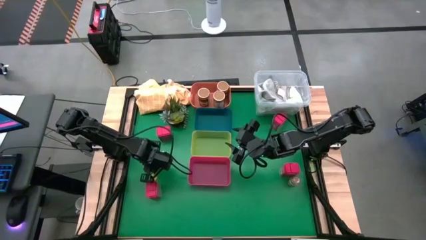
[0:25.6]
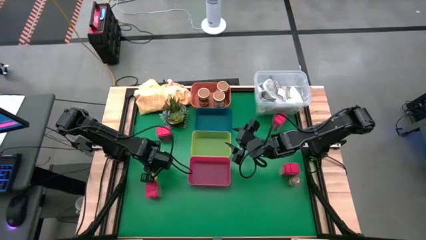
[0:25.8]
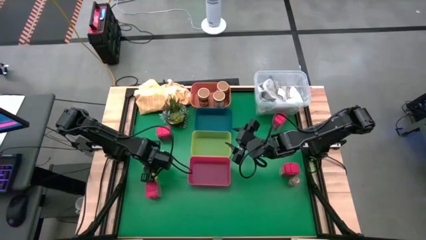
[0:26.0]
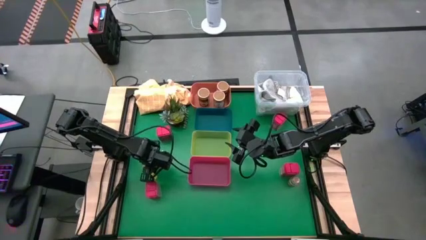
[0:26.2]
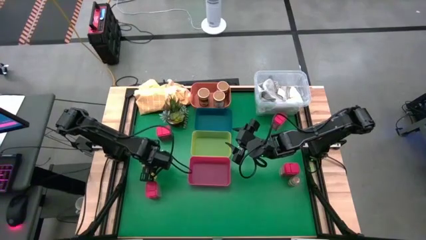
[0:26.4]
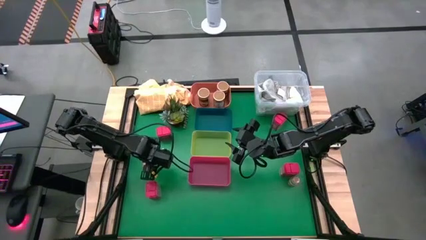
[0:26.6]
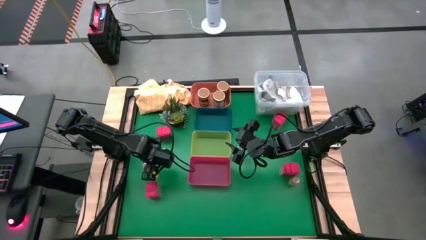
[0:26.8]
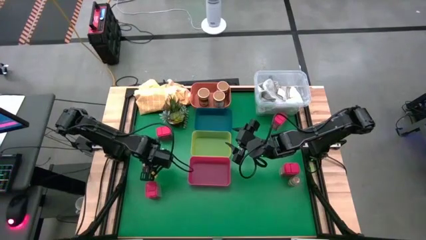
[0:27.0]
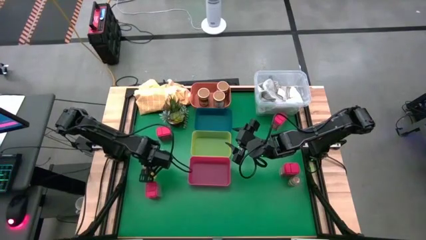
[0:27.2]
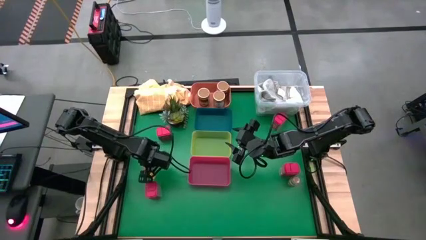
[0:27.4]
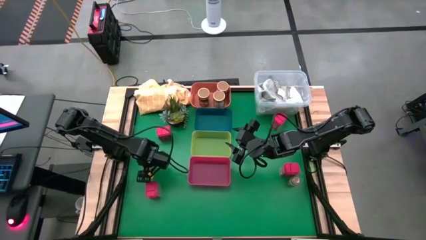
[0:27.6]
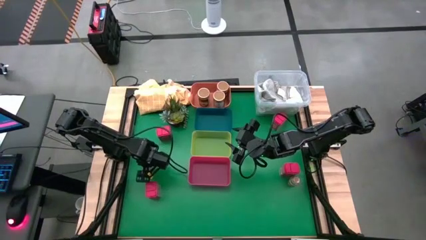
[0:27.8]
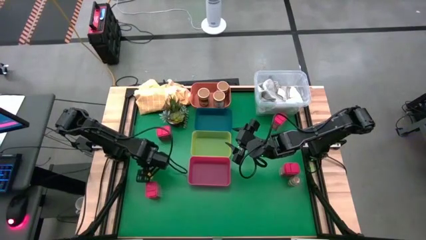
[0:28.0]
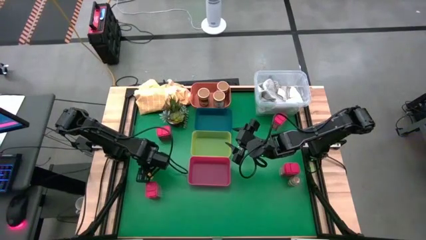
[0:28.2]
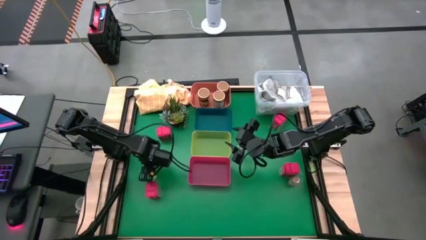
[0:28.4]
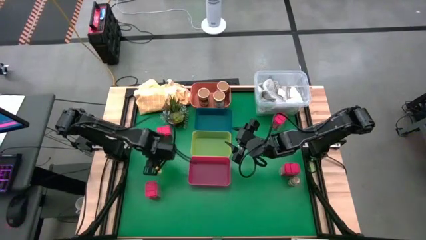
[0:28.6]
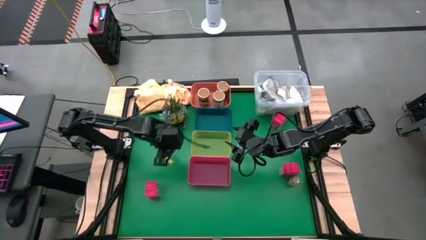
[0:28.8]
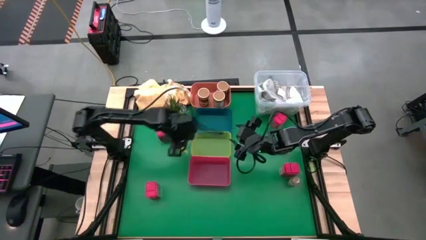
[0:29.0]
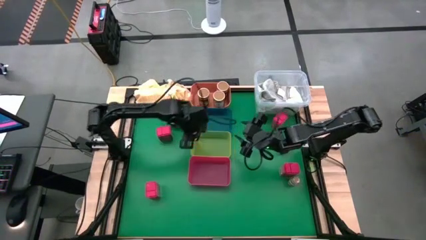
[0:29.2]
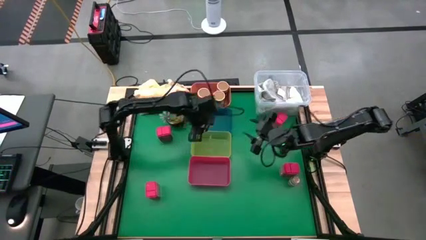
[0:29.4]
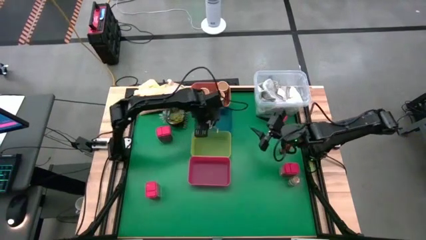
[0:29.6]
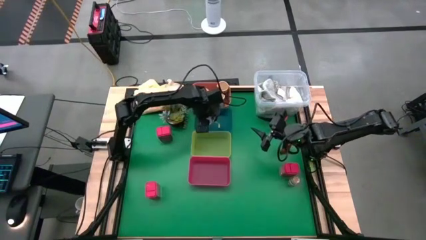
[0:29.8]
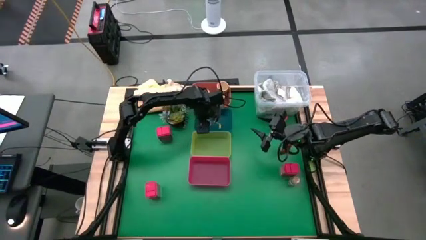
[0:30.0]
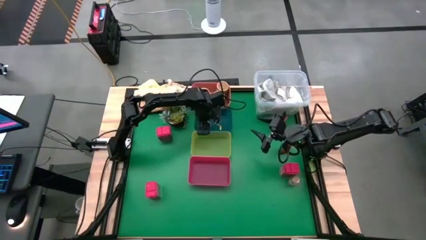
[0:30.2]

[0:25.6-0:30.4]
Task: Sort spices by type
Put the left brown spice bottle into the blue bin

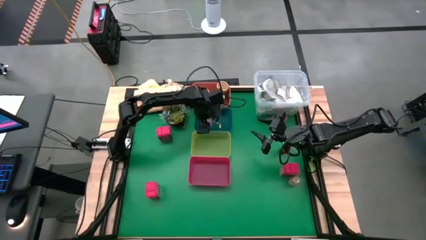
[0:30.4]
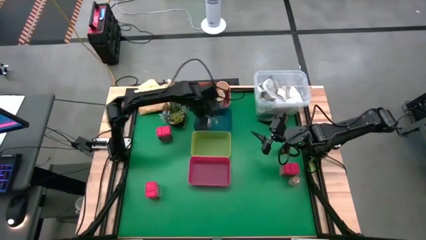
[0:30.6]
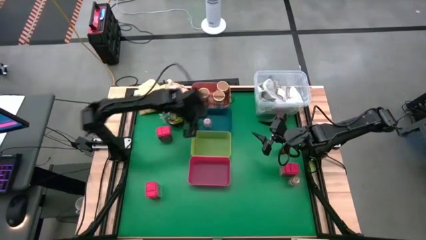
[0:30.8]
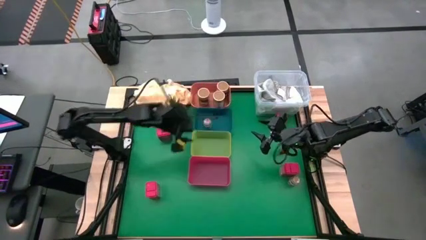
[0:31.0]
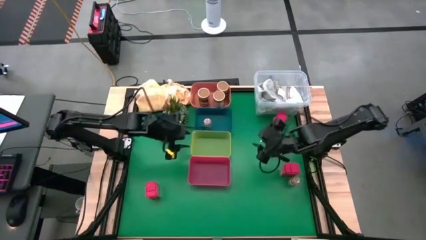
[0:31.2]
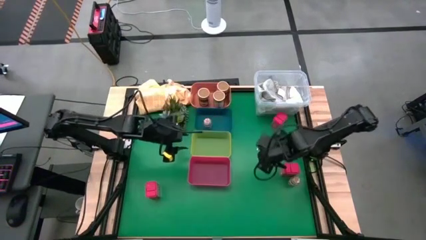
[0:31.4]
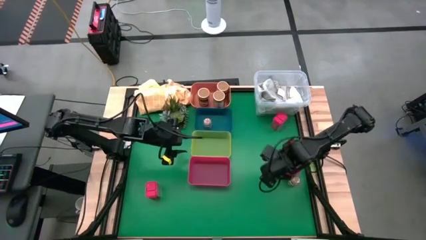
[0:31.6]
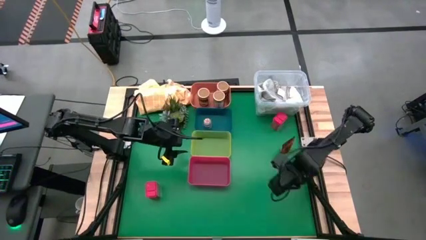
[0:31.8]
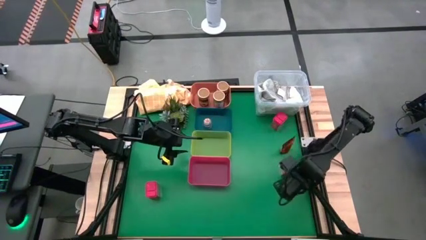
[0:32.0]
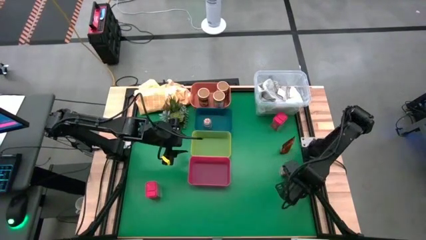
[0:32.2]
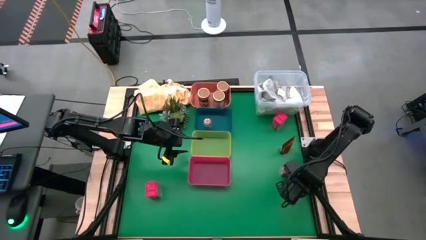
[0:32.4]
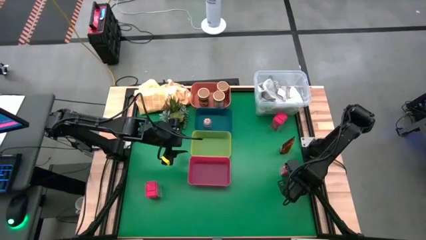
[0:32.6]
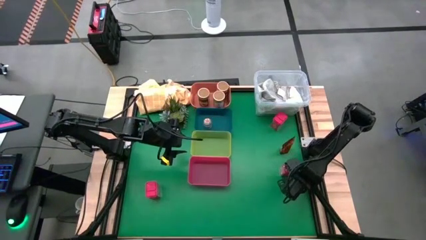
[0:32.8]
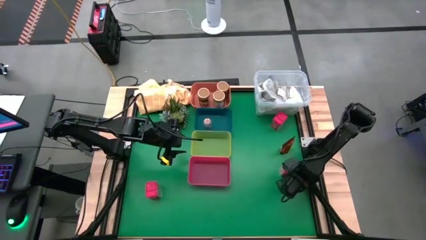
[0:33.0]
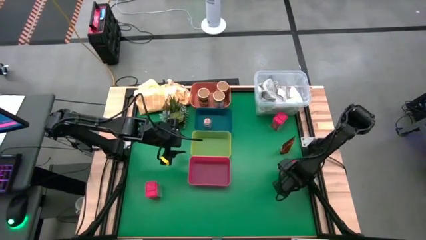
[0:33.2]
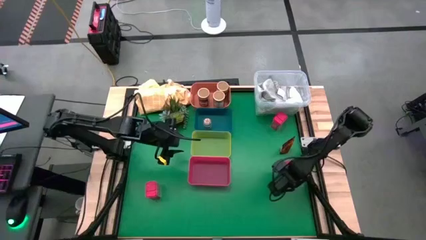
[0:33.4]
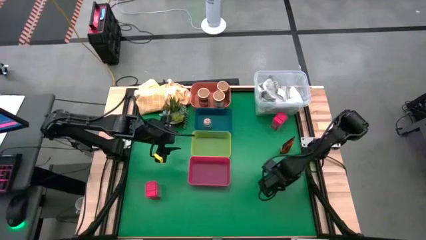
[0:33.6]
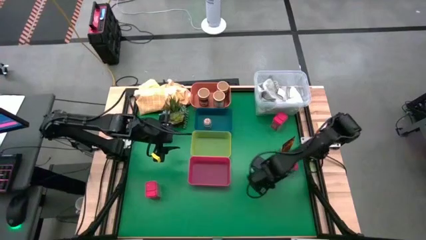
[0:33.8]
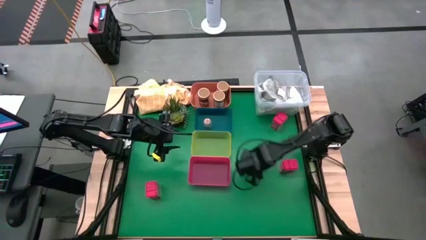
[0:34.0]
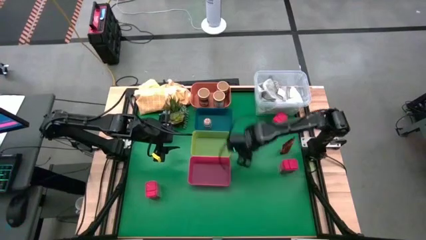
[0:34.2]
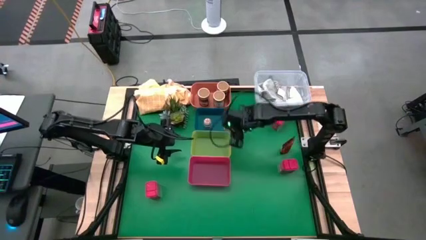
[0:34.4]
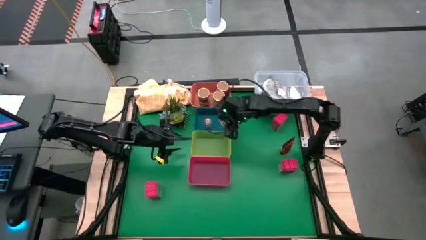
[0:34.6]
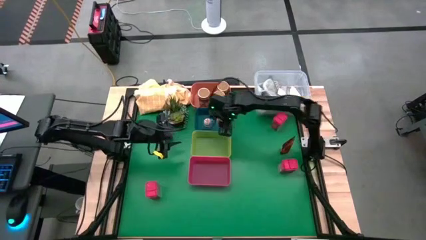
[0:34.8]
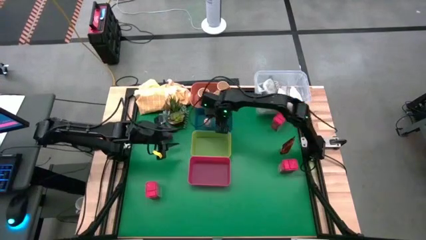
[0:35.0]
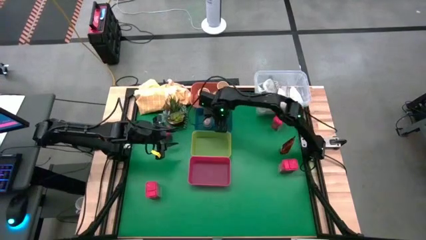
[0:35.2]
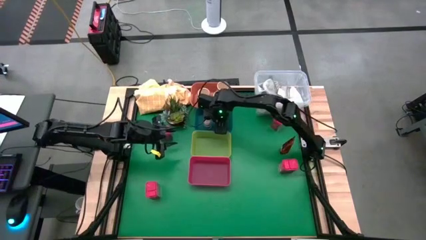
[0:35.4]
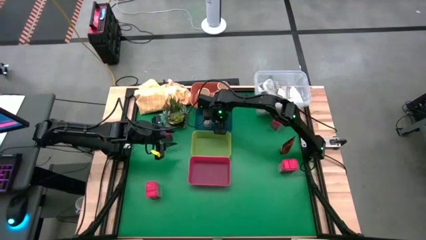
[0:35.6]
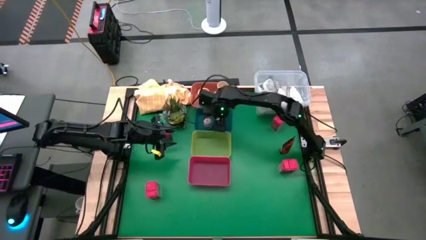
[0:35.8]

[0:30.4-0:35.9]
Put the brown spice bottle into the blue bin

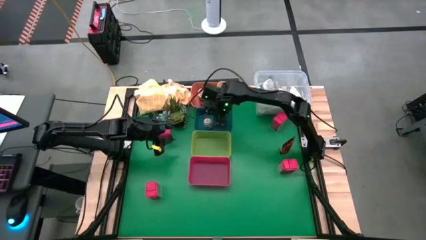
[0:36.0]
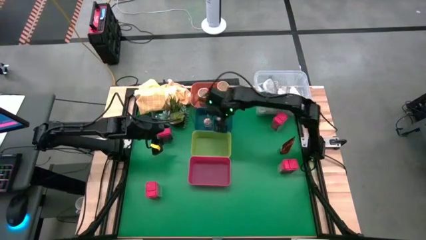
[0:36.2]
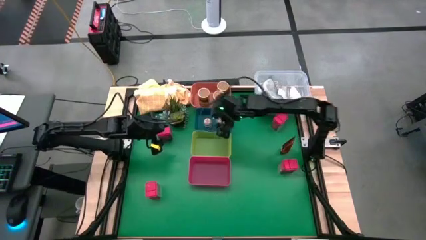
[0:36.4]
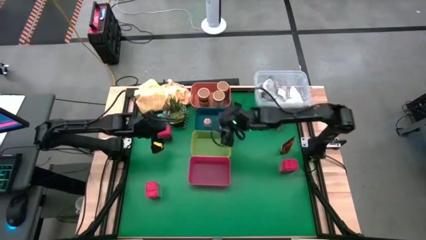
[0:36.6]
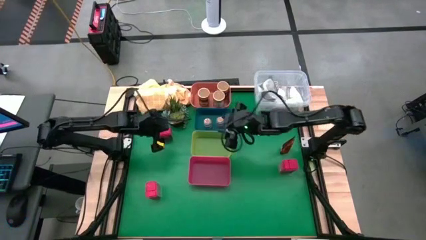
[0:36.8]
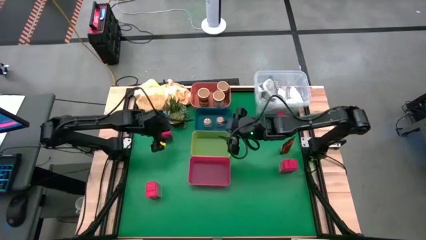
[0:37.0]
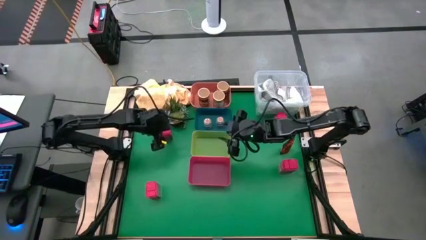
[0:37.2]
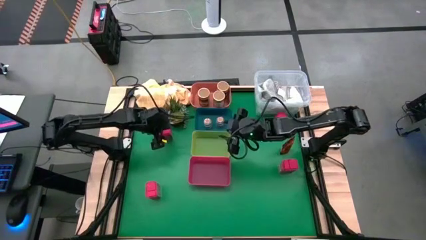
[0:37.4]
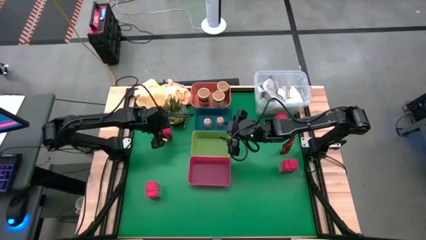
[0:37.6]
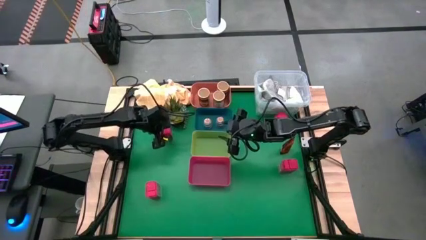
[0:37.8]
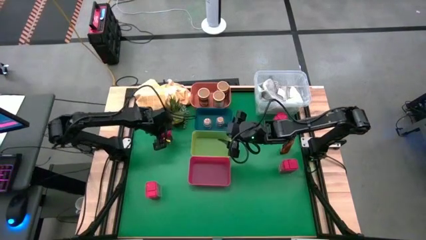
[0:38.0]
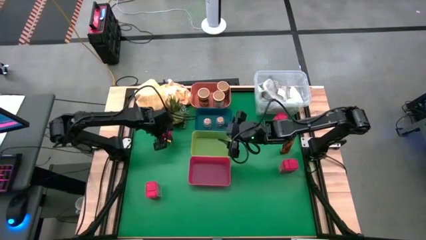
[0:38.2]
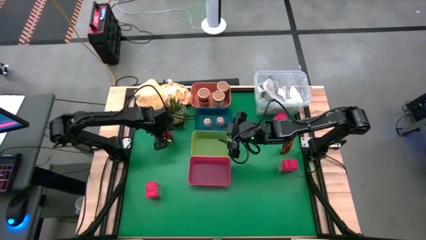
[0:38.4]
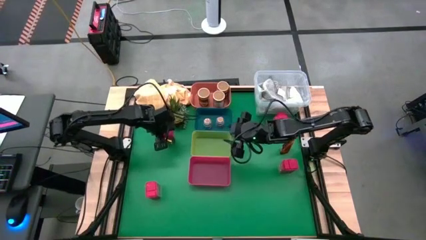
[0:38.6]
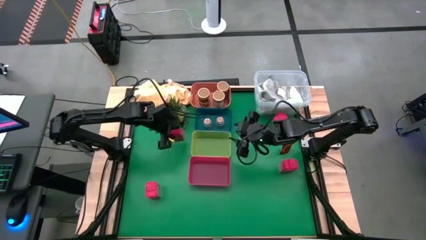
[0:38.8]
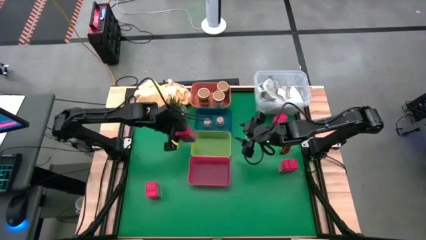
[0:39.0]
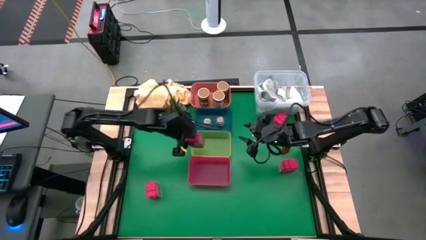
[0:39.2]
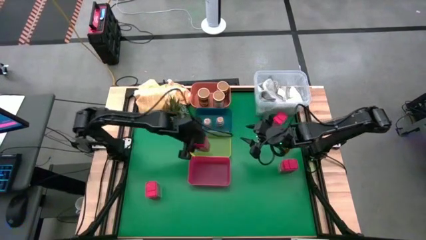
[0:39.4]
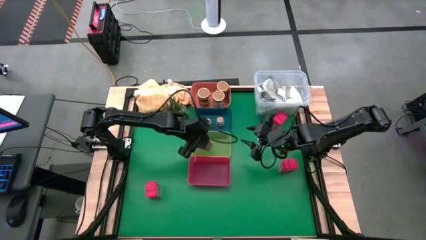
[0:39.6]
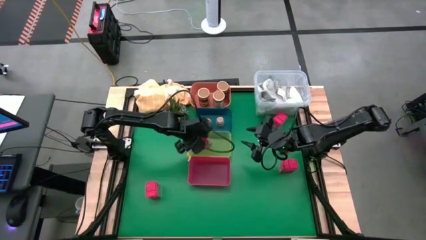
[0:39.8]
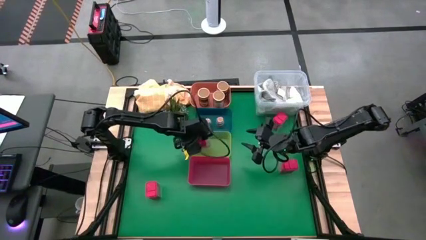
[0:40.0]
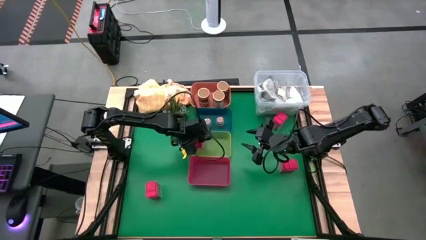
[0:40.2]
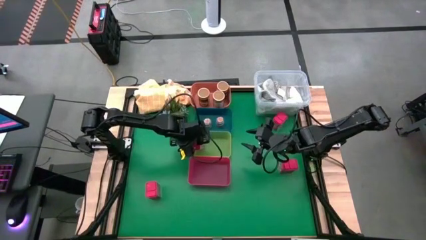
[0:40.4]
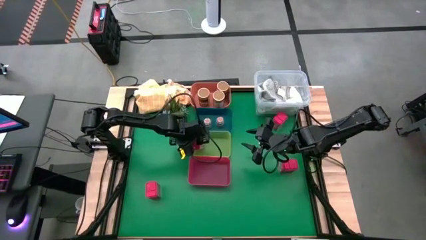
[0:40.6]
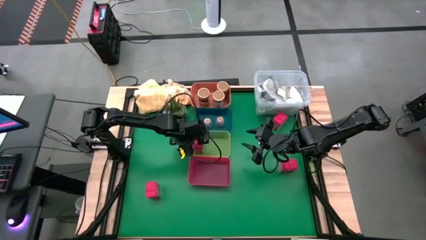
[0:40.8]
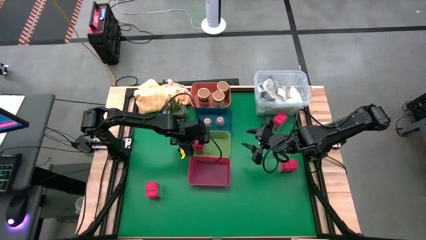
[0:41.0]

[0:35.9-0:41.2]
Put the top left red spice can into the yellow bin
